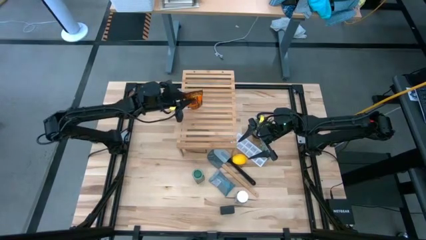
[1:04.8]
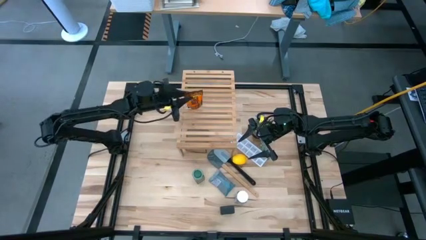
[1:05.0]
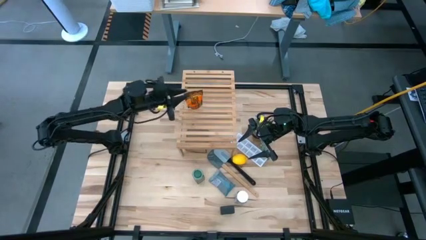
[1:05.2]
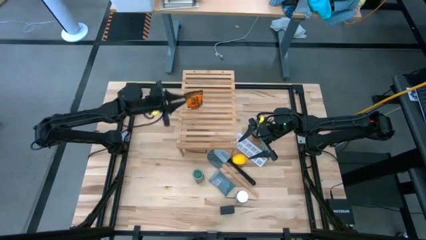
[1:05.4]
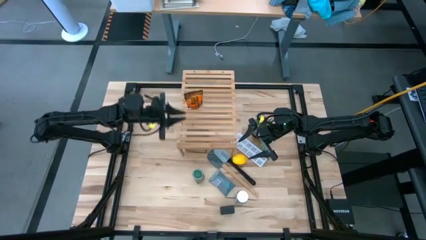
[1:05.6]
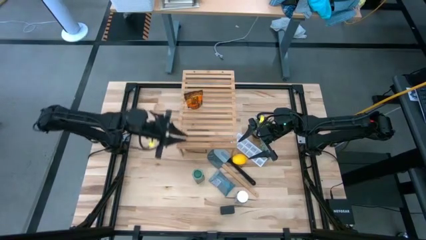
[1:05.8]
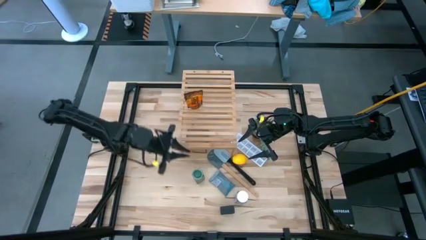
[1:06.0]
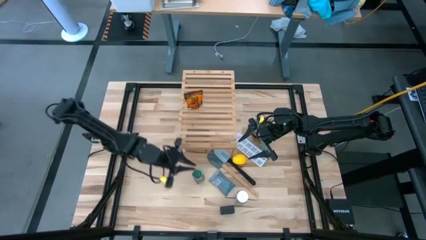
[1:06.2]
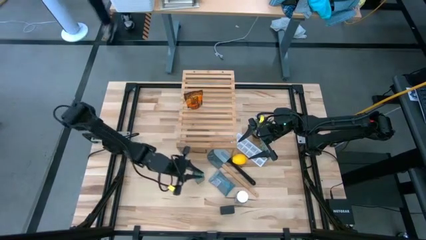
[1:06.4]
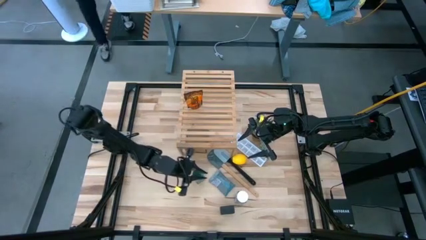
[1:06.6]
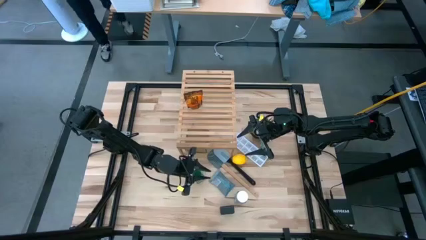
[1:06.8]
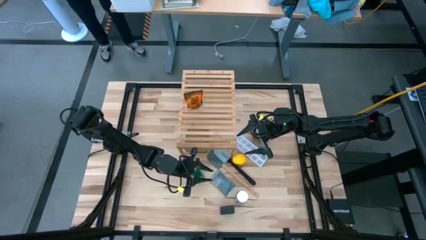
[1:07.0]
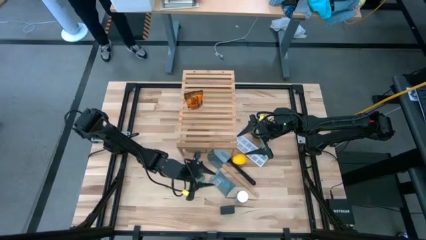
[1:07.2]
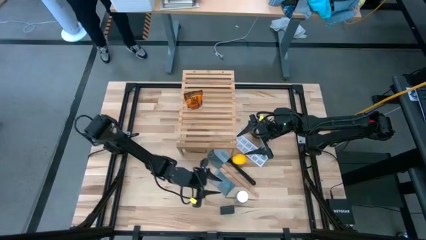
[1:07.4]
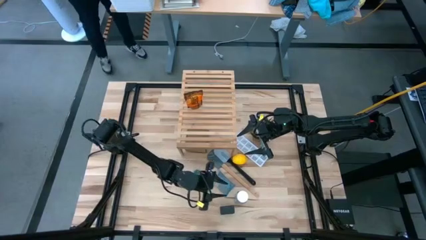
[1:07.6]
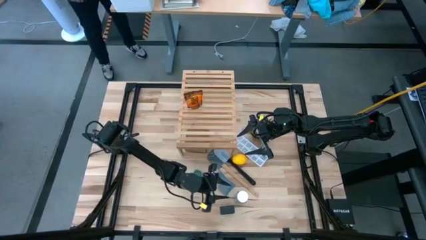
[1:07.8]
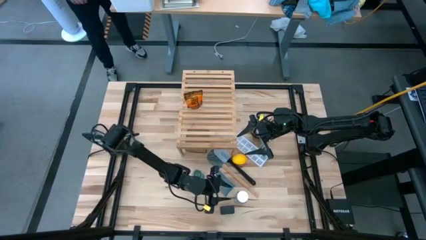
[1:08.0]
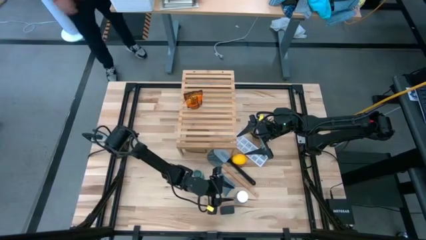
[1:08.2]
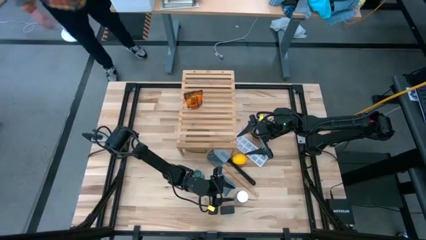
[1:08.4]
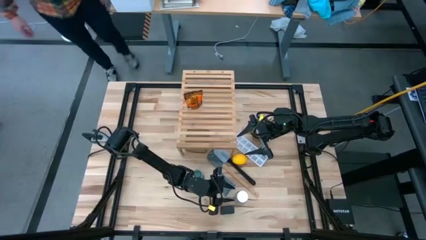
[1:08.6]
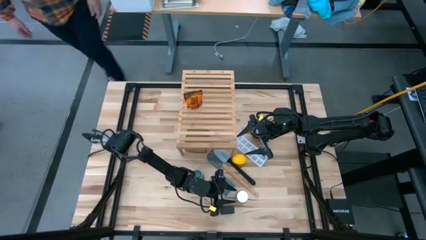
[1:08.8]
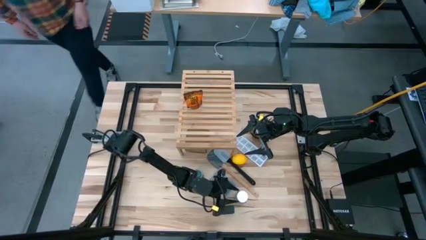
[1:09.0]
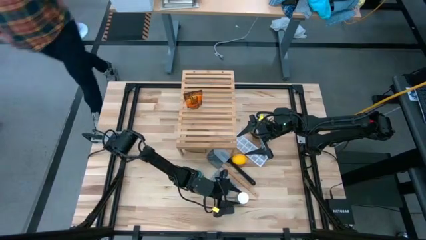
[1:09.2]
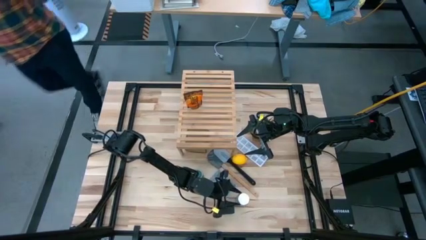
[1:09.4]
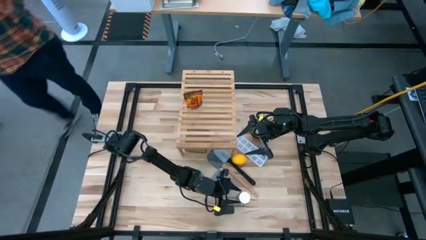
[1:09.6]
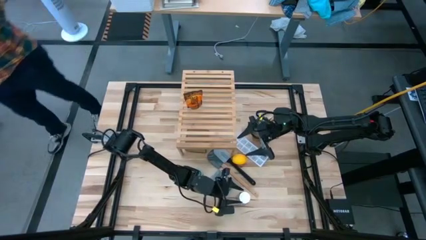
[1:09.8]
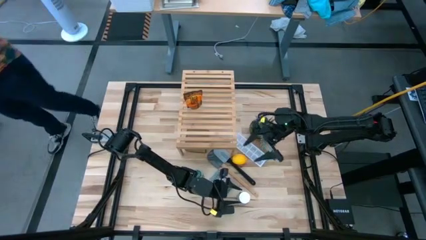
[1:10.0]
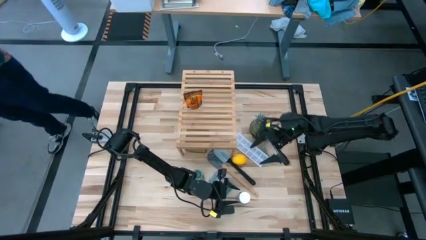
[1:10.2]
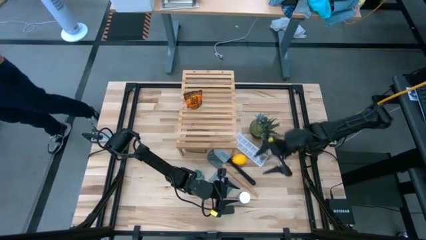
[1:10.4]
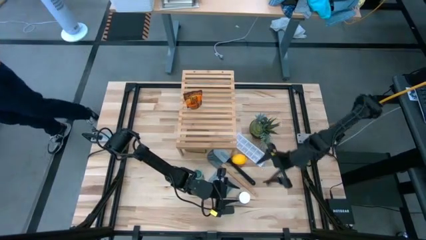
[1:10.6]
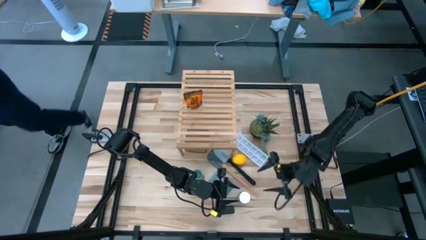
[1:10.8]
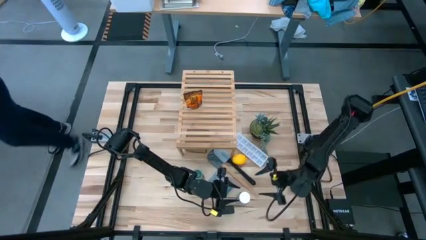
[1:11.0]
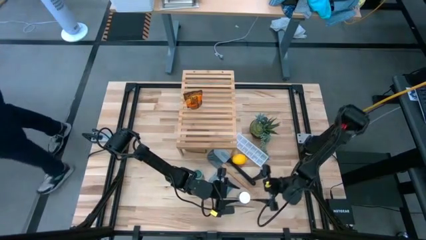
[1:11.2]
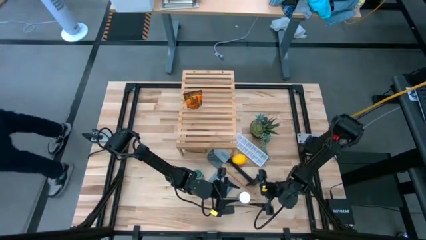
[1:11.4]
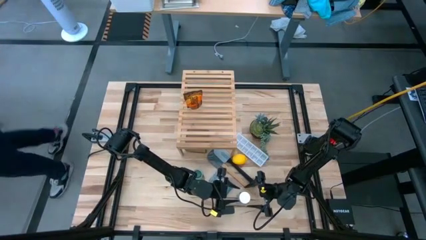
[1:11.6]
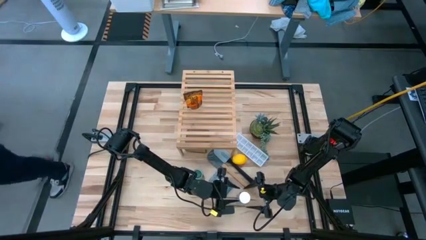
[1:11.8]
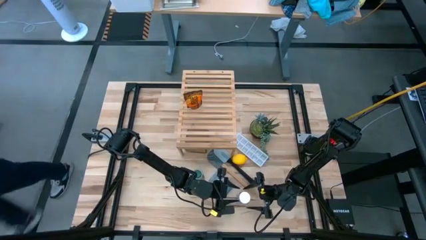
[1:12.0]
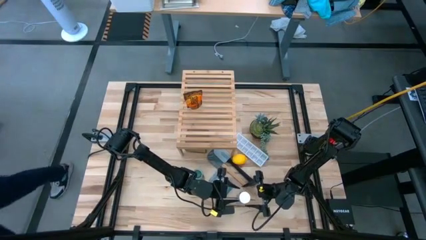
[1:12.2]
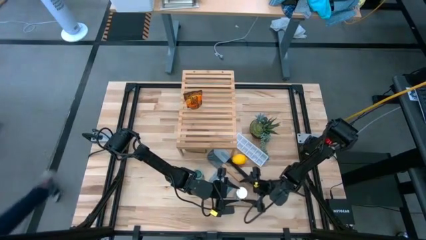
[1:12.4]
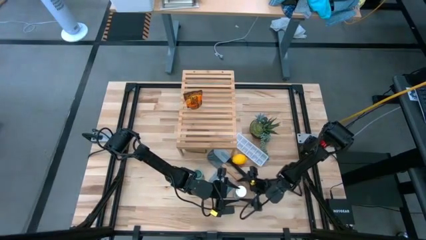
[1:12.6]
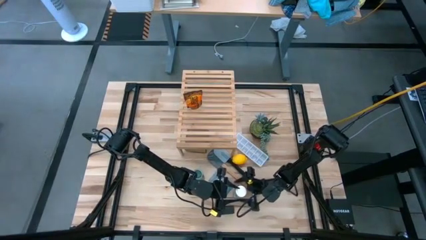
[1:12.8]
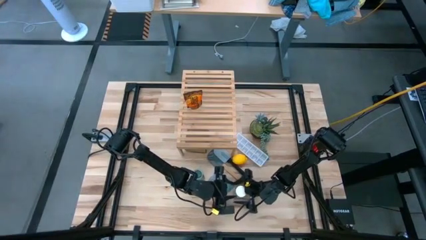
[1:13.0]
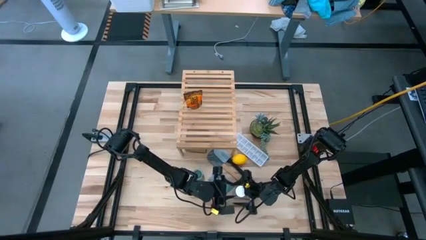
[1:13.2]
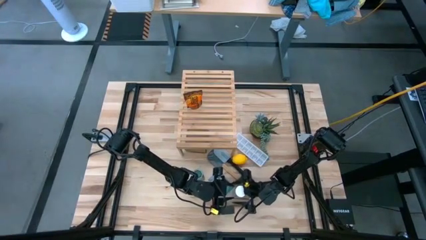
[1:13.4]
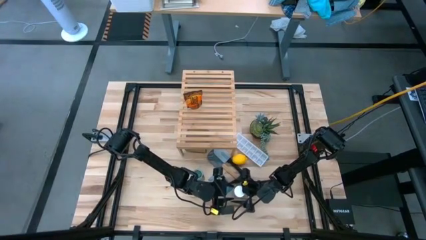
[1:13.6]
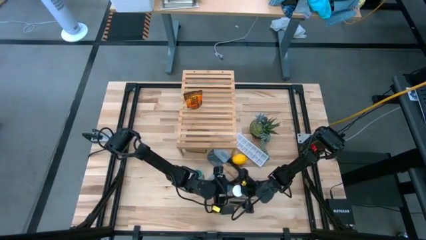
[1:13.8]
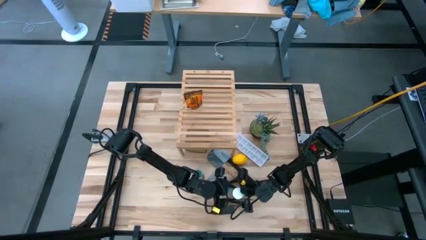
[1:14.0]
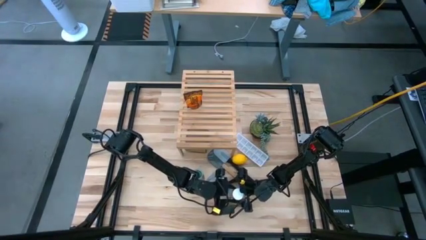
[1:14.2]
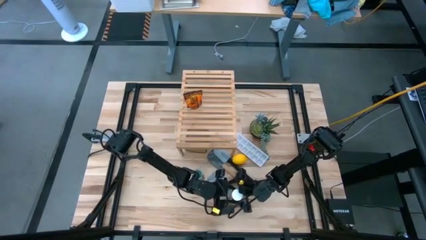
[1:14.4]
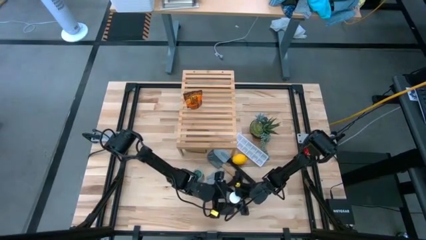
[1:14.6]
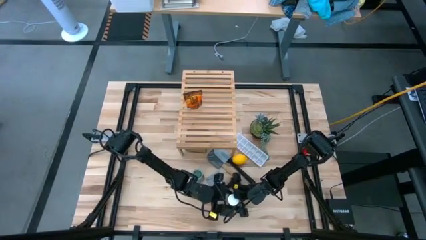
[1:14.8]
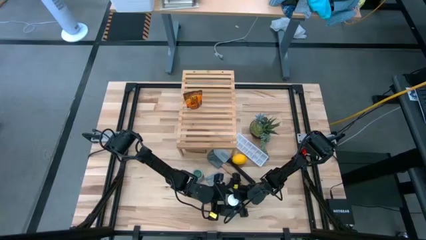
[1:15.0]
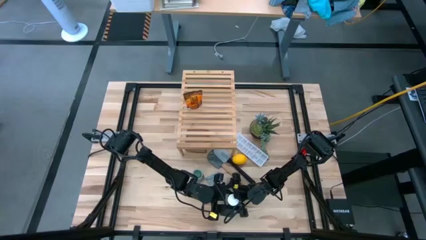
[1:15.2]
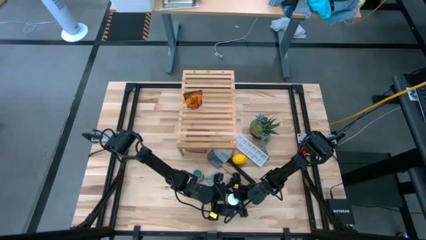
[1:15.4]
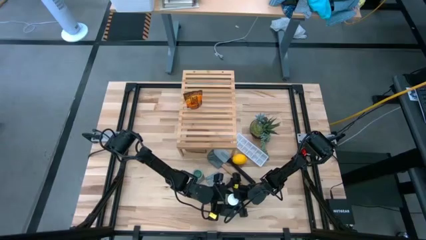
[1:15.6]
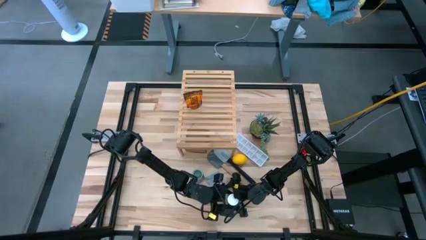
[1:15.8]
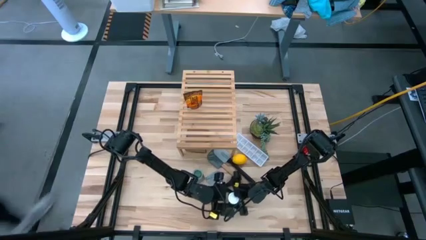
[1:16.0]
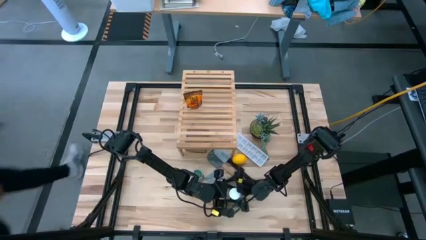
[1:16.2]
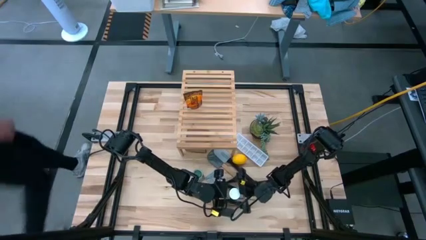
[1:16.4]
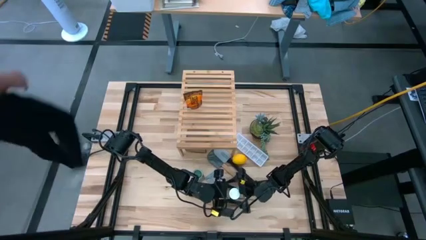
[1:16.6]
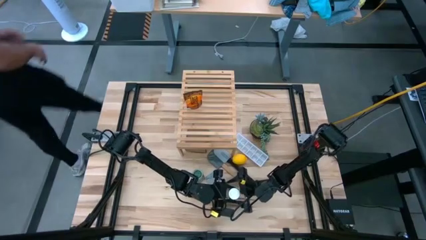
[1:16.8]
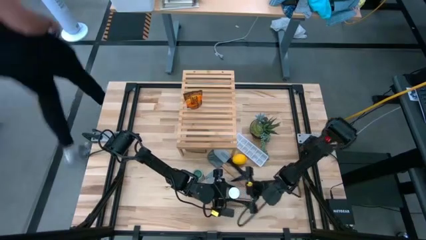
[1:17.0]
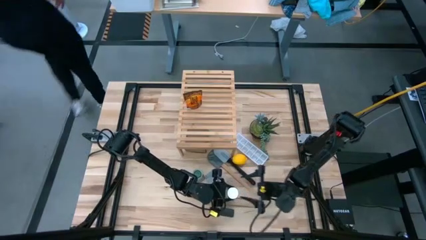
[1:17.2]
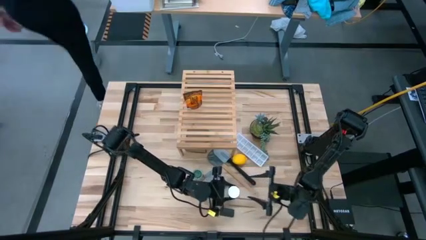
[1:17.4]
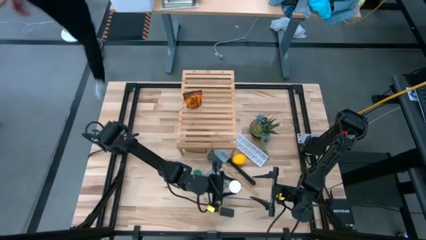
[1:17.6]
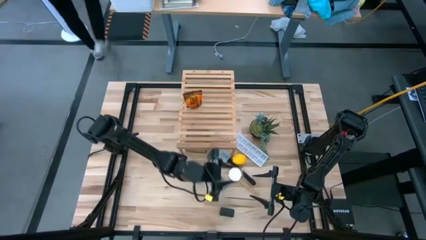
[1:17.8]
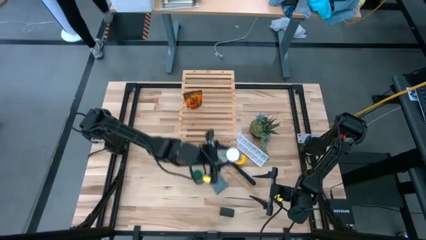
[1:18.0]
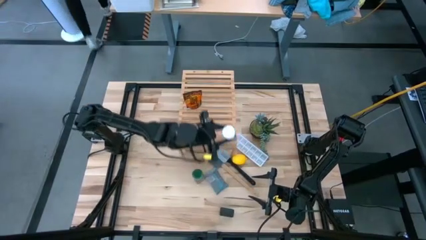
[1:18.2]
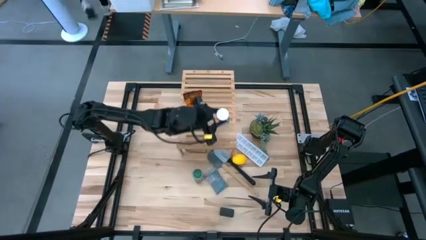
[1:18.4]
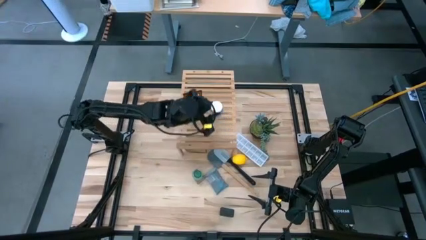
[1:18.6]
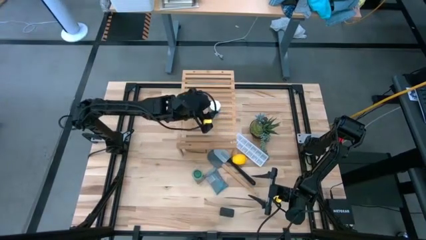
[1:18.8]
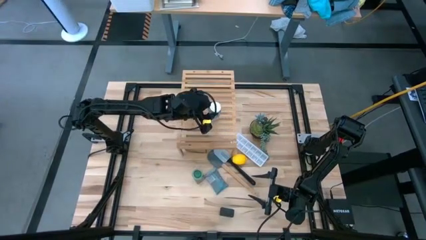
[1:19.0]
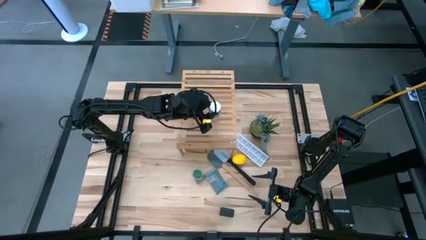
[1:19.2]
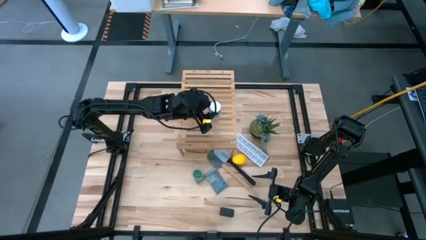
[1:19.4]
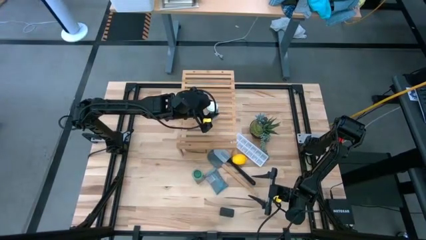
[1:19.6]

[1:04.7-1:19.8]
Task: Shelf spices
Put the white seasoning bottle on the shelf
